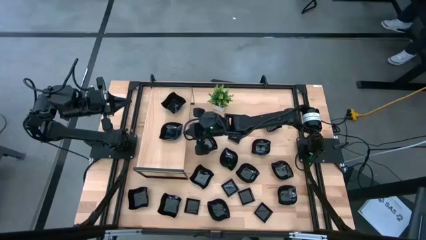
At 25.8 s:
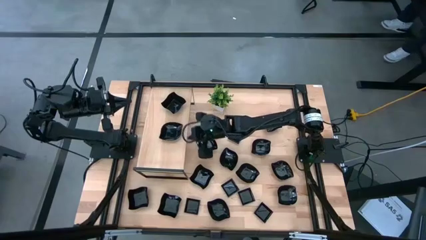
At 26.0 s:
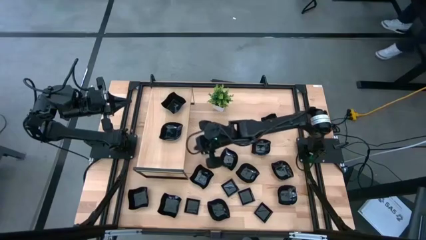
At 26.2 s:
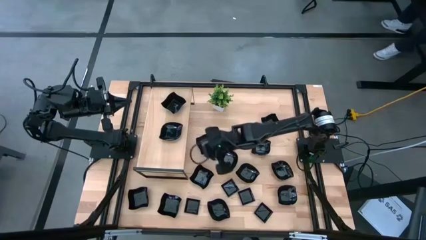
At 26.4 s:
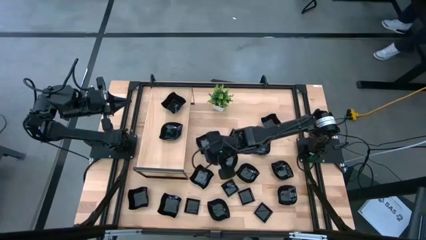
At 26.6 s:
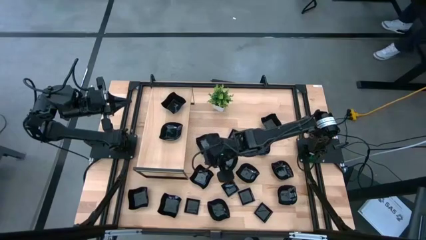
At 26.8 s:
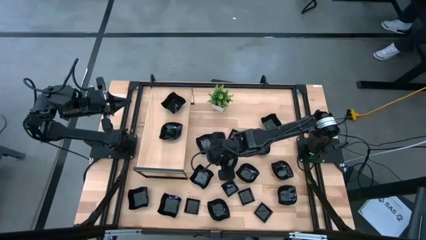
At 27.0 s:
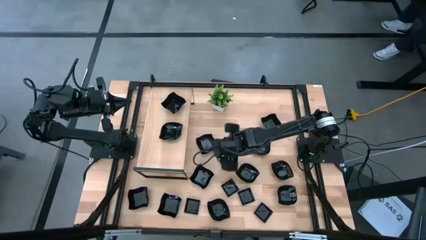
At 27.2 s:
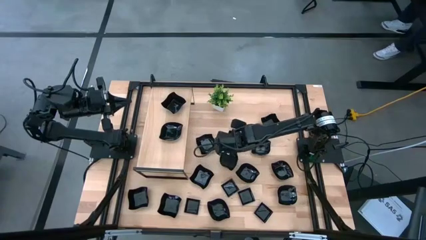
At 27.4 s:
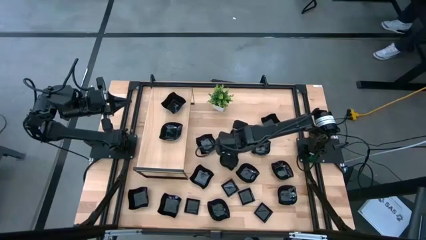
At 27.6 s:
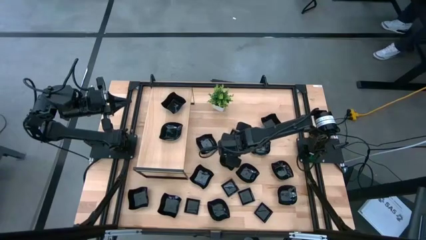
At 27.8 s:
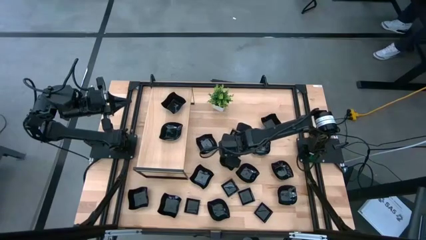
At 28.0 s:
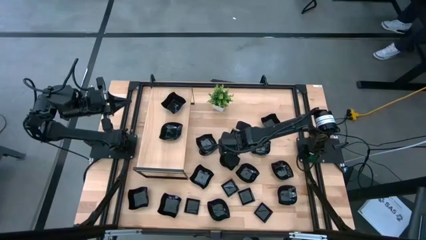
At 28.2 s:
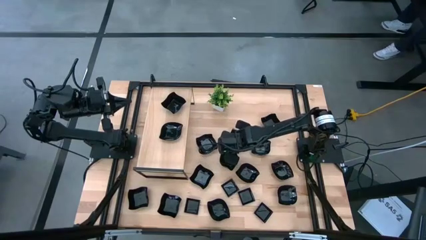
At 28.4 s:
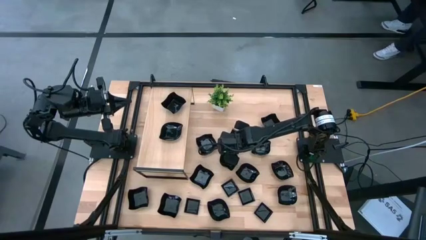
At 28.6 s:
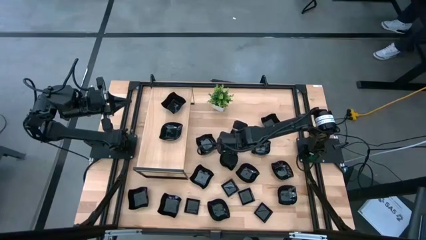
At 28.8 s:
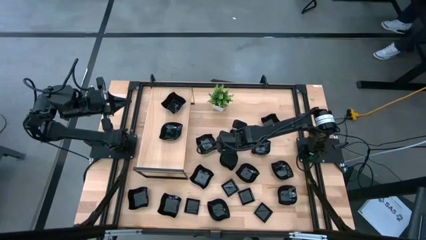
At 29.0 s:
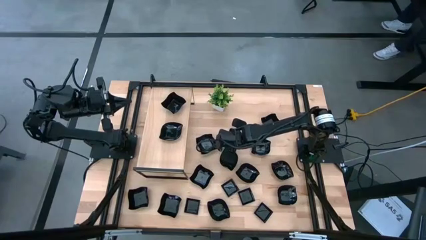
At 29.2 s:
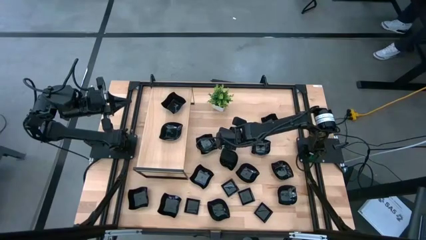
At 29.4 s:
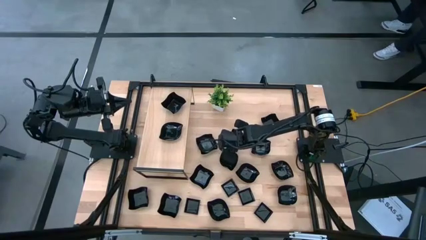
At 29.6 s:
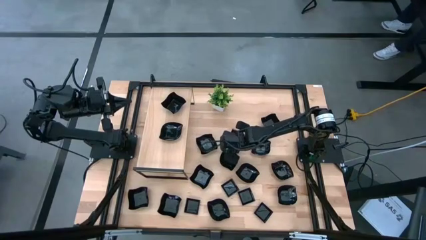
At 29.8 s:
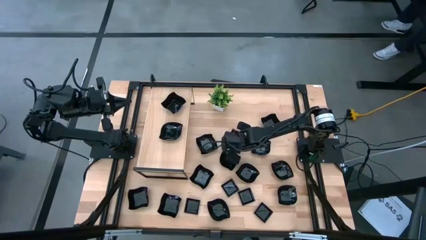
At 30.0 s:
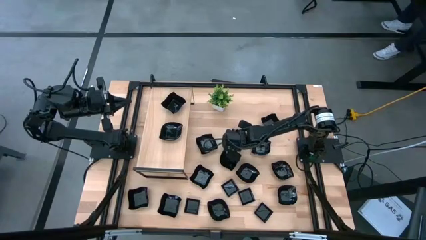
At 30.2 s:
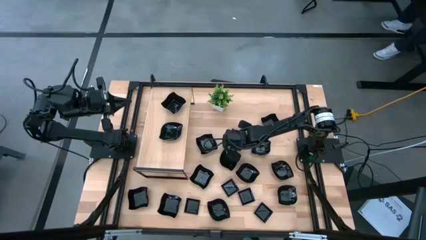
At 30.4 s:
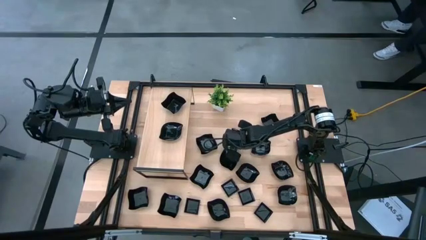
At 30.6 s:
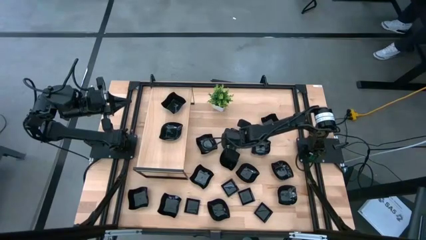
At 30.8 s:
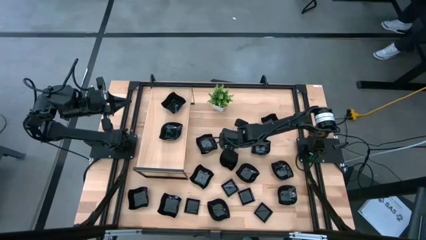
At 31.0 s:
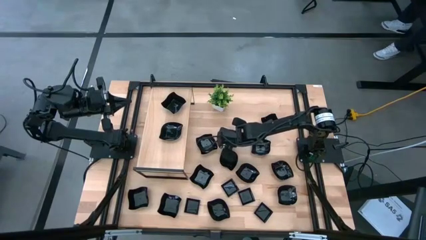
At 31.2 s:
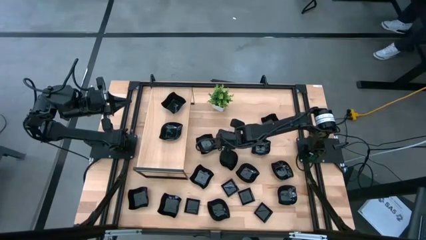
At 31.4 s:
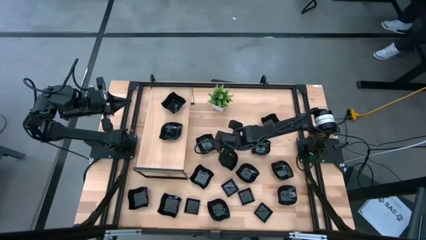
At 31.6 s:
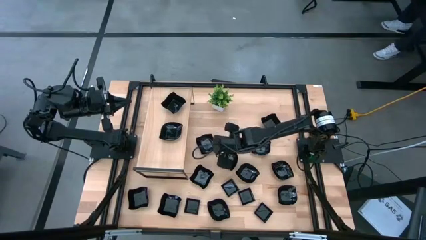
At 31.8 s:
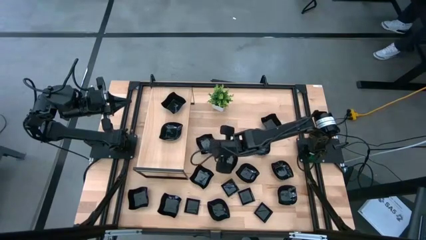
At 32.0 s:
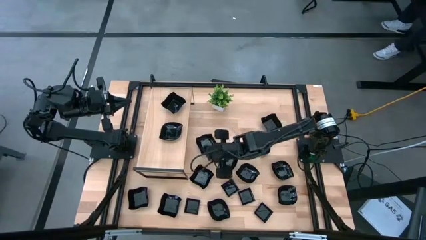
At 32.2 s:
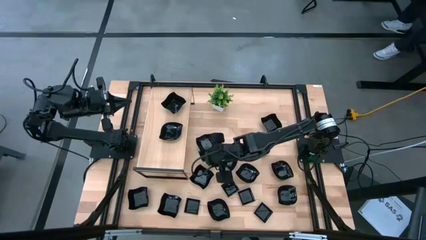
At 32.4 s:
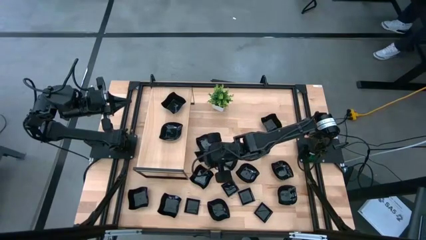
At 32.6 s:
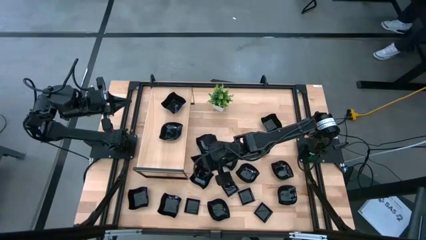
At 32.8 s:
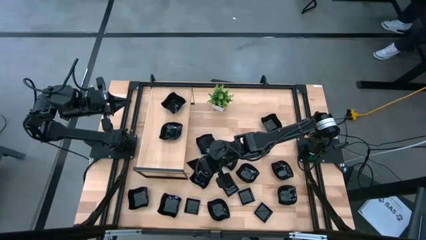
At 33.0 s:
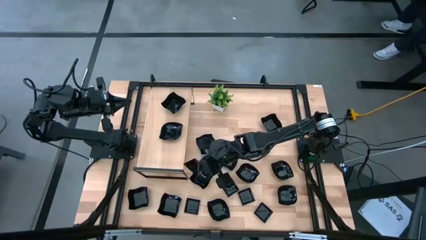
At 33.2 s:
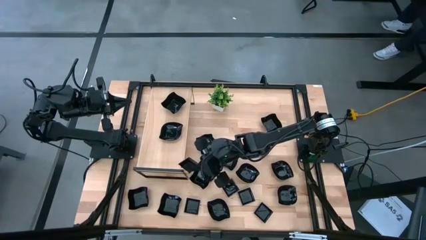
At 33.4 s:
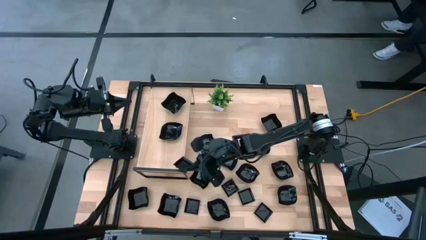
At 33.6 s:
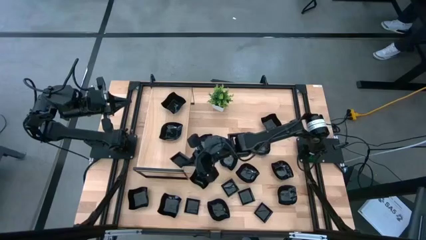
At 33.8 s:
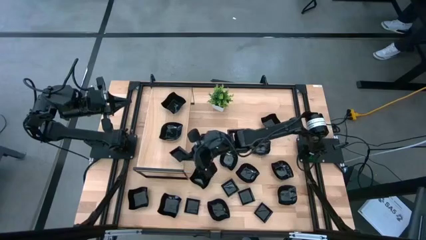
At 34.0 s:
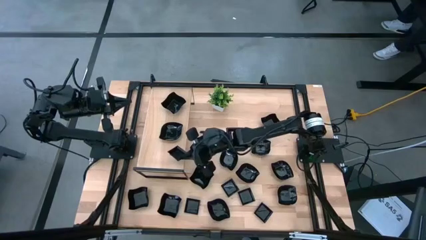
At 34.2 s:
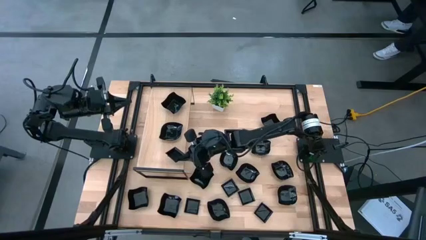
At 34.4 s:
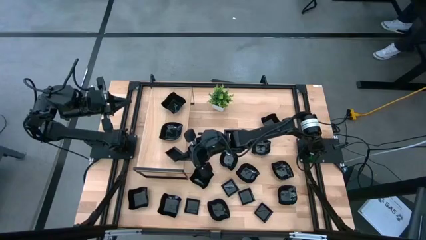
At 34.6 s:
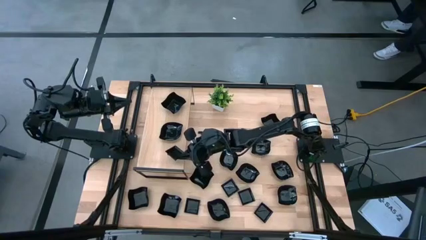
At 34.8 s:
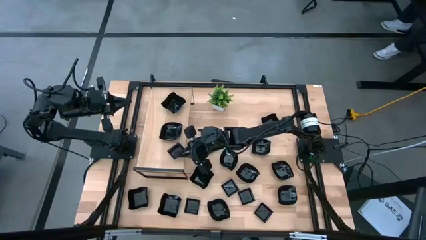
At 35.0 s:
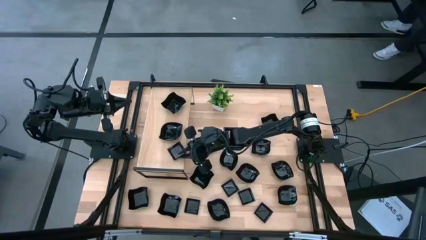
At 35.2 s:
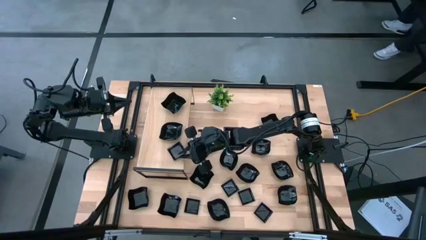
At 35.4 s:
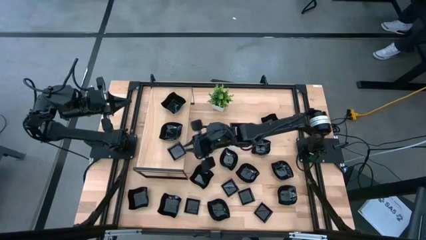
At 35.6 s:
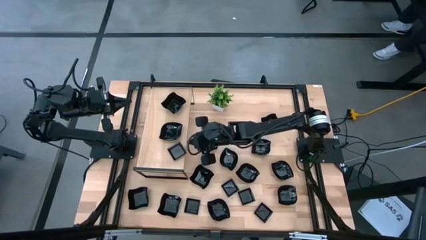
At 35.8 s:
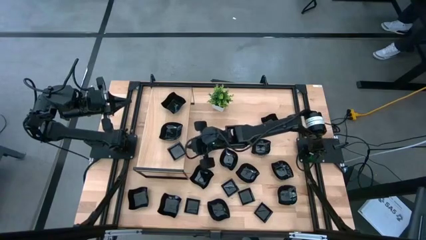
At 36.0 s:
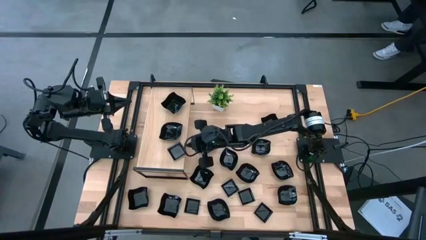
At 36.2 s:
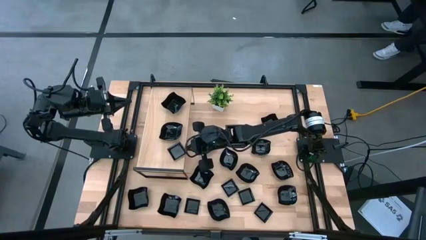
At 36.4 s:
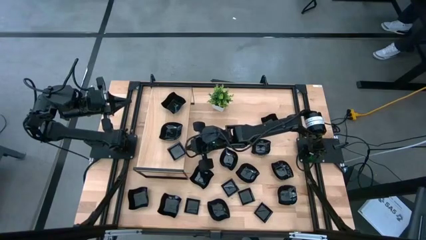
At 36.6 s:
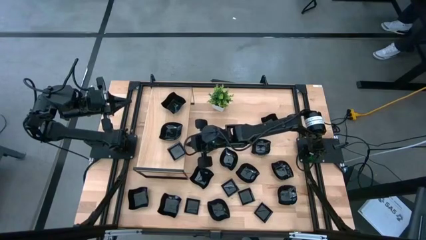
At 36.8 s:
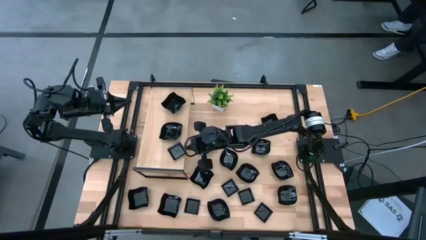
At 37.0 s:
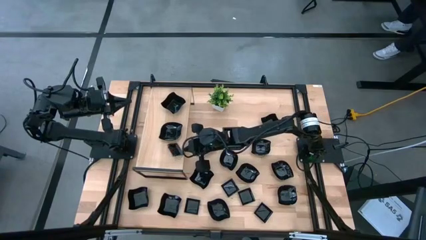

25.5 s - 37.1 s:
Task: Pick & Place Mini shaped plates
Put the black square shape bowl on top of the shelf

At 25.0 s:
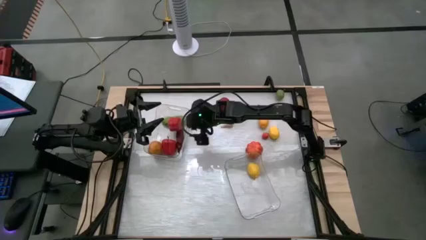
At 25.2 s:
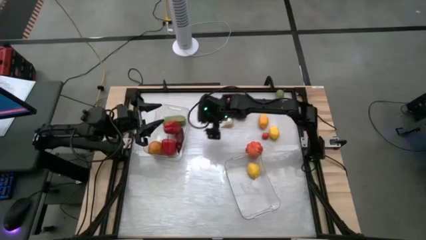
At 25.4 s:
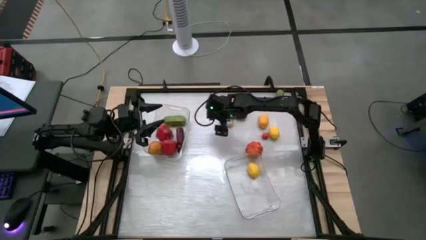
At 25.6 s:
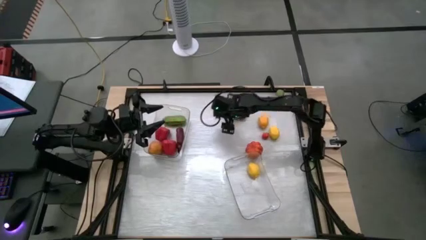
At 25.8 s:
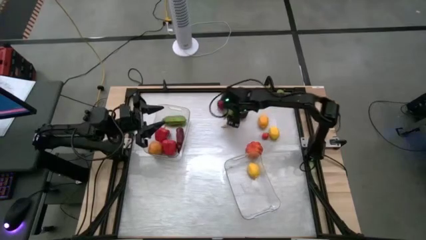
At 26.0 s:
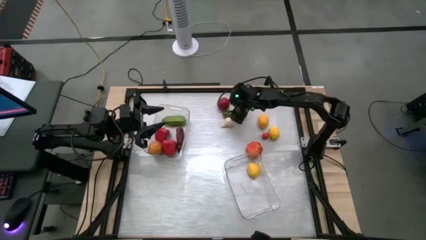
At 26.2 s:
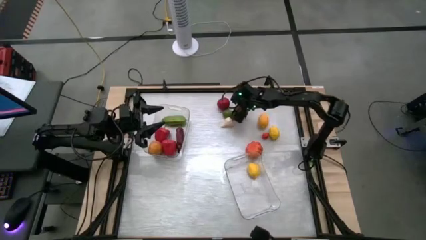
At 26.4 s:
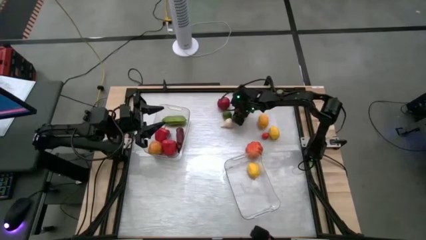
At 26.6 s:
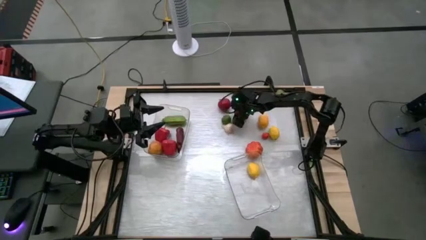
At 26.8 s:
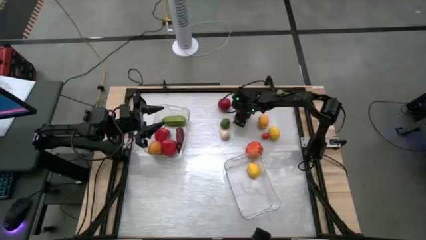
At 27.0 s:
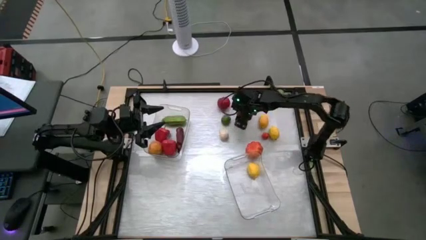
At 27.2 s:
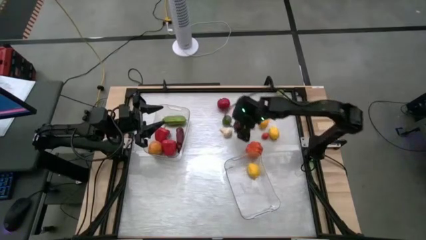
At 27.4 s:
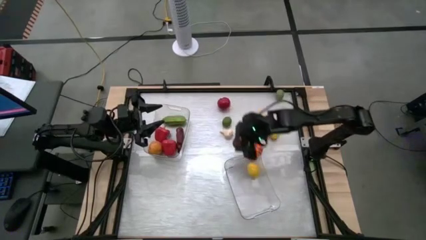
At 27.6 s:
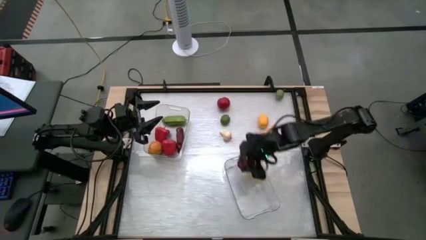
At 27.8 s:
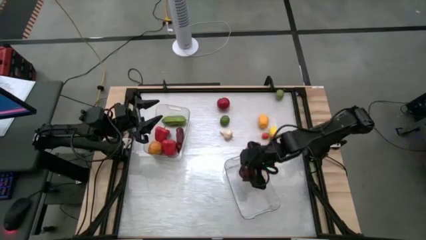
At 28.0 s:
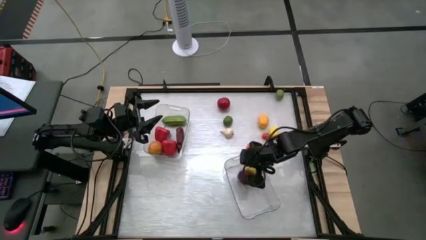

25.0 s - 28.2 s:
Task: Sort produce into baskets
Put the red apple into the right transparent bin

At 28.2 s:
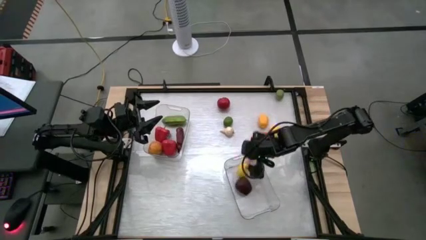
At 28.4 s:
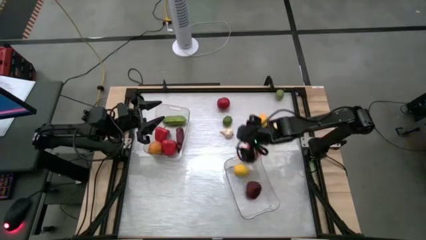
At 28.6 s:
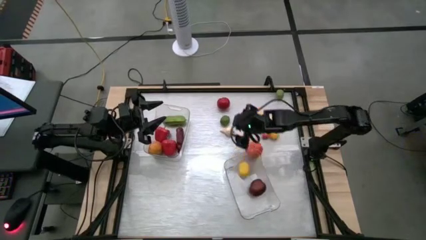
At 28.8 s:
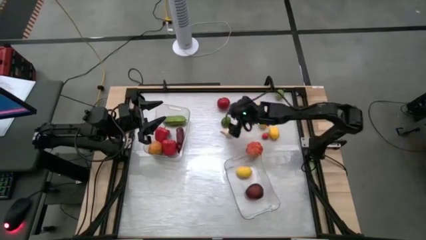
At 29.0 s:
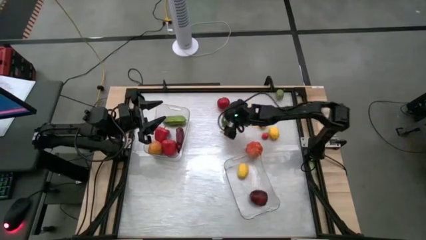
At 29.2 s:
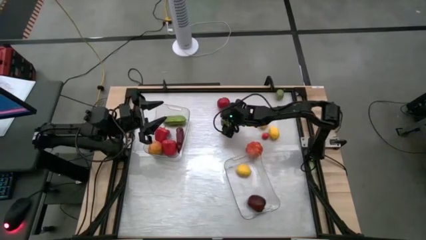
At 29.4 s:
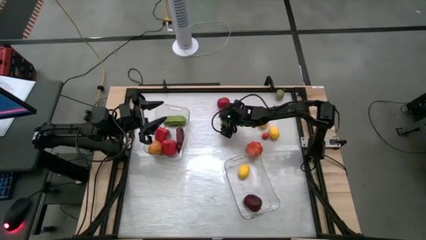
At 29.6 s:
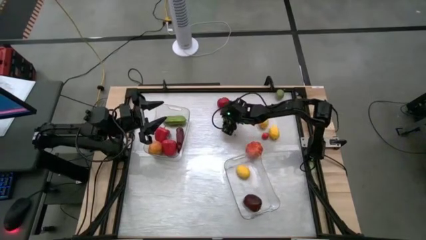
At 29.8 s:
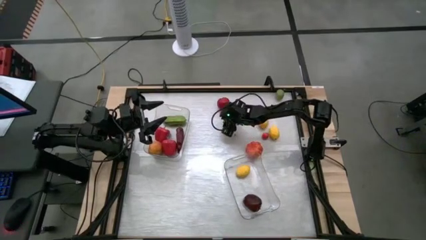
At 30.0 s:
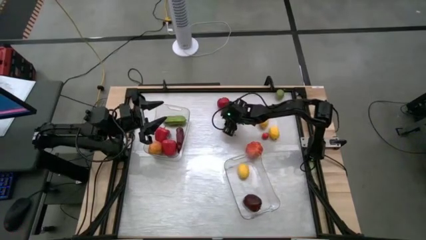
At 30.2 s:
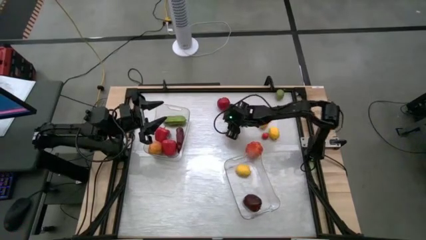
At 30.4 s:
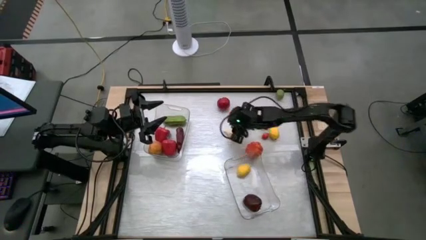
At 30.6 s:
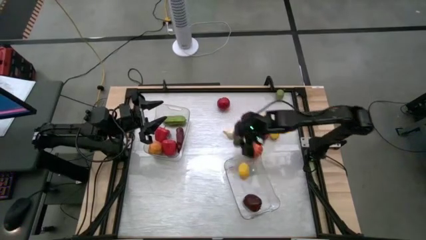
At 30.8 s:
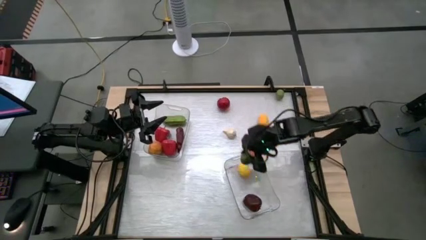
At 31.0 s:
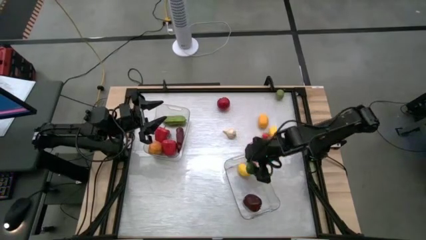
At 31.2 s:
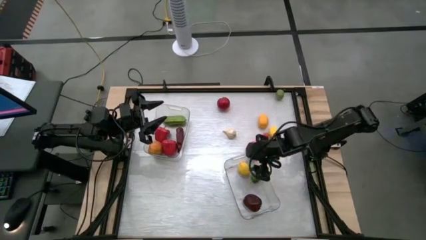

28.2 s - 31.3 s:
Put the left green lime into the right transparent bin
